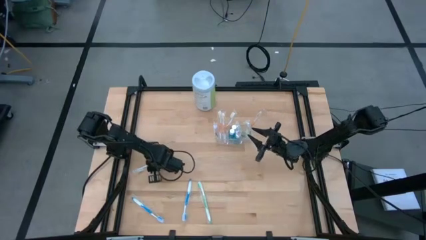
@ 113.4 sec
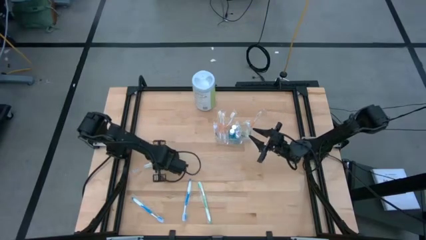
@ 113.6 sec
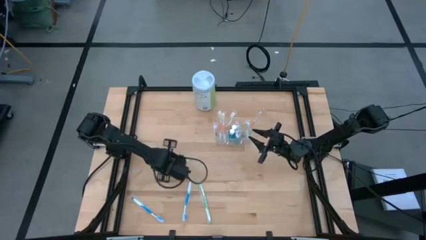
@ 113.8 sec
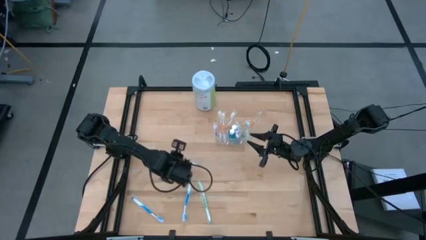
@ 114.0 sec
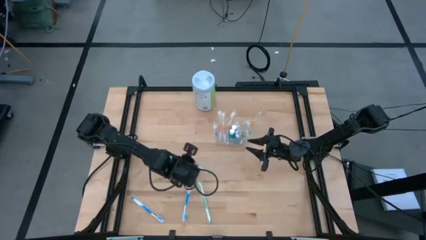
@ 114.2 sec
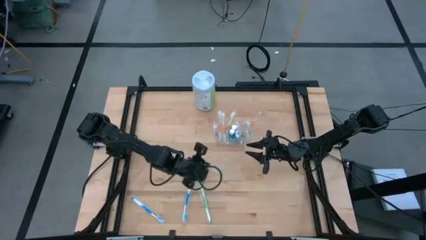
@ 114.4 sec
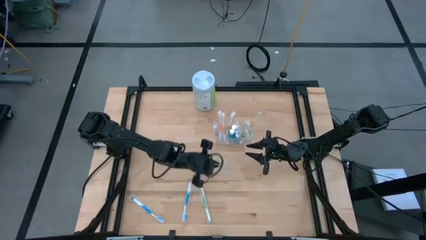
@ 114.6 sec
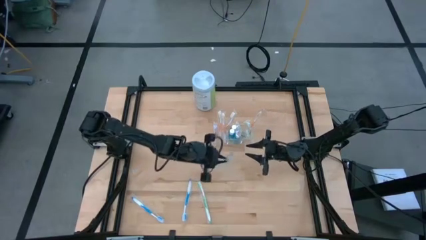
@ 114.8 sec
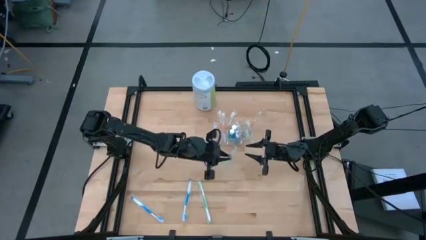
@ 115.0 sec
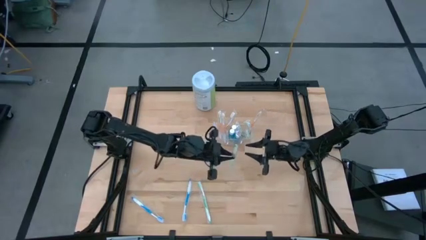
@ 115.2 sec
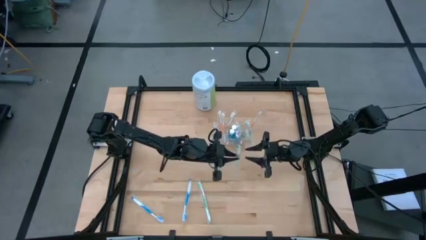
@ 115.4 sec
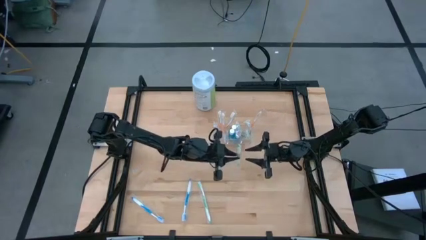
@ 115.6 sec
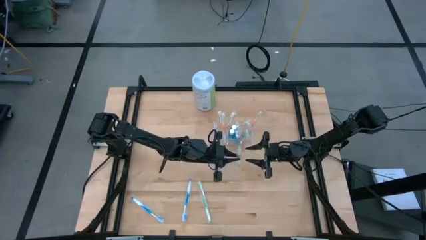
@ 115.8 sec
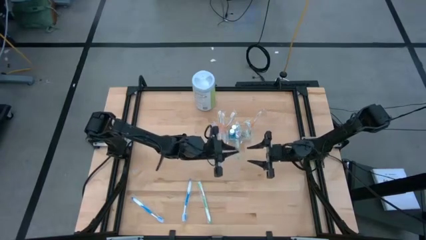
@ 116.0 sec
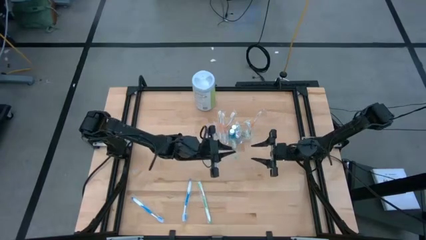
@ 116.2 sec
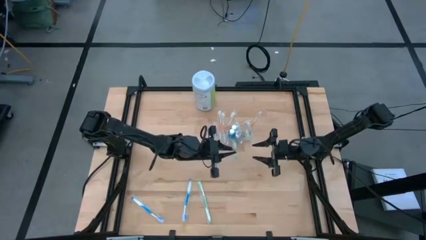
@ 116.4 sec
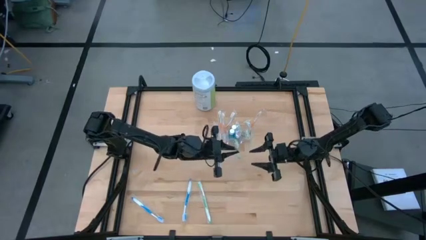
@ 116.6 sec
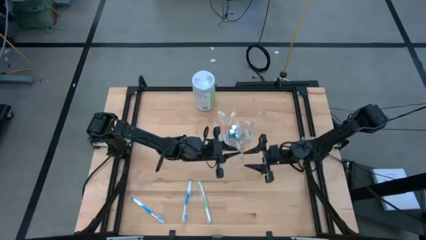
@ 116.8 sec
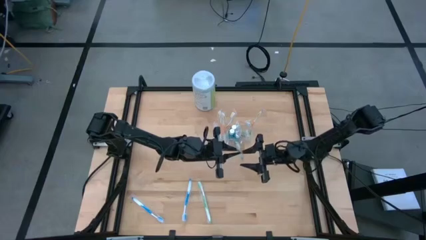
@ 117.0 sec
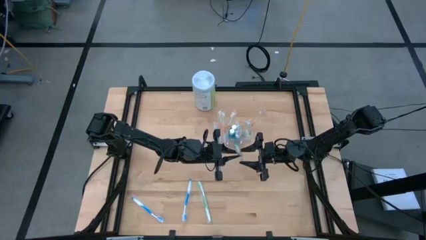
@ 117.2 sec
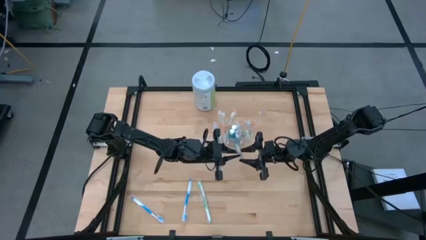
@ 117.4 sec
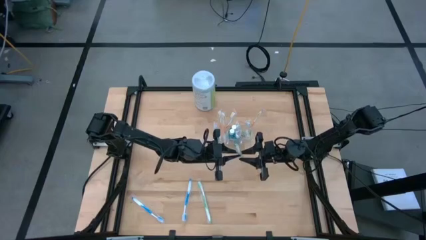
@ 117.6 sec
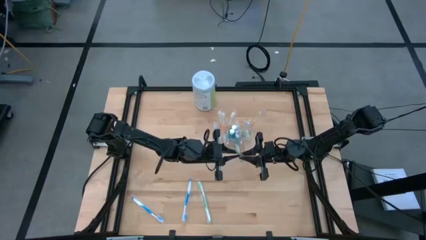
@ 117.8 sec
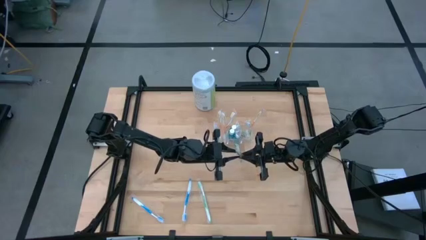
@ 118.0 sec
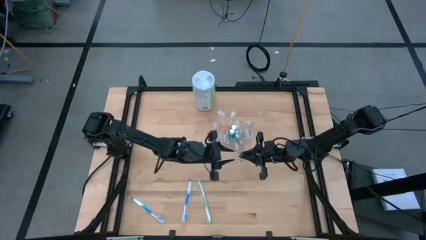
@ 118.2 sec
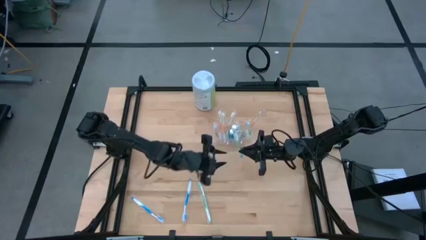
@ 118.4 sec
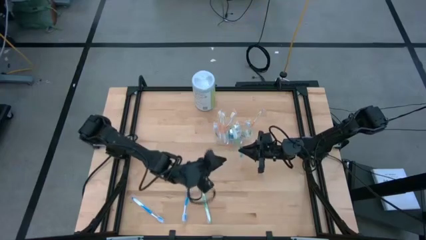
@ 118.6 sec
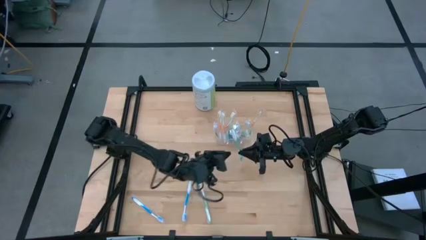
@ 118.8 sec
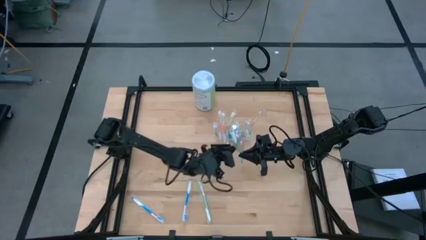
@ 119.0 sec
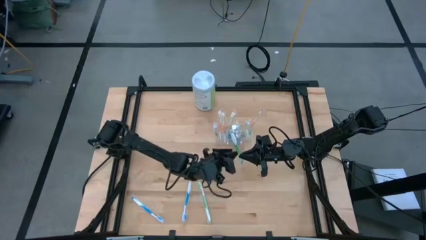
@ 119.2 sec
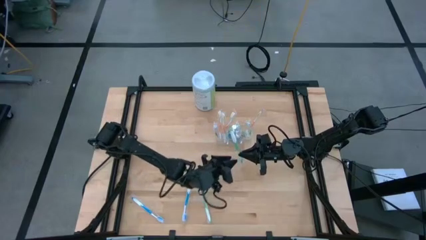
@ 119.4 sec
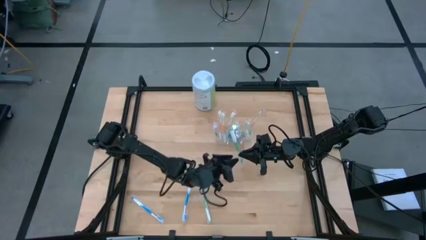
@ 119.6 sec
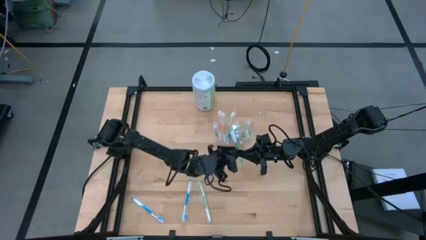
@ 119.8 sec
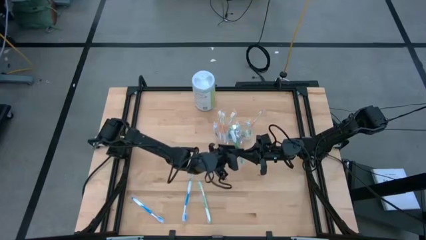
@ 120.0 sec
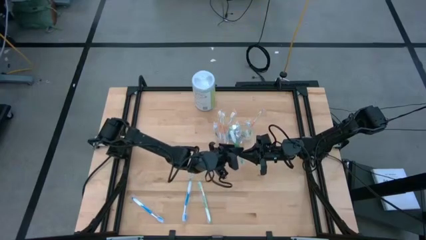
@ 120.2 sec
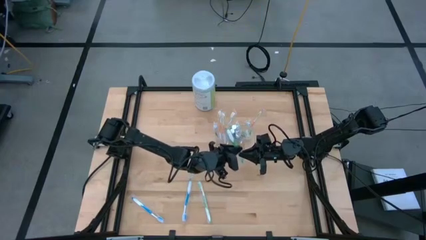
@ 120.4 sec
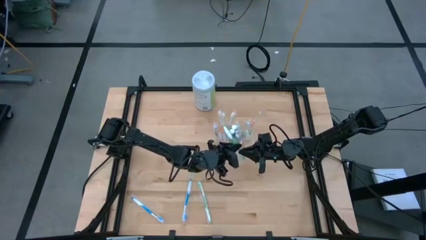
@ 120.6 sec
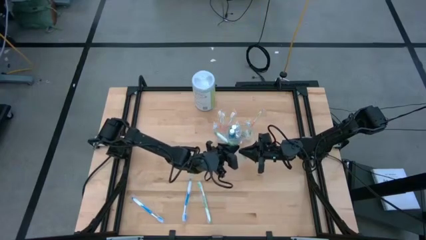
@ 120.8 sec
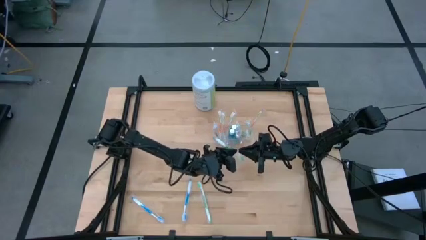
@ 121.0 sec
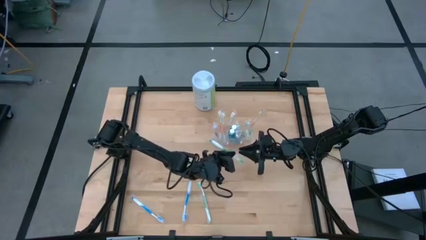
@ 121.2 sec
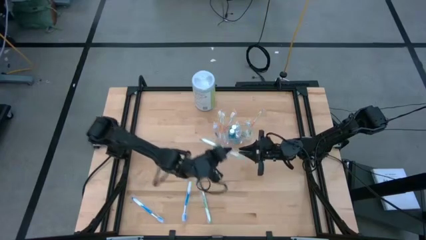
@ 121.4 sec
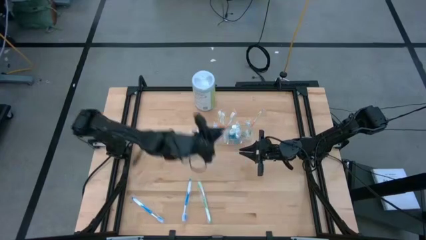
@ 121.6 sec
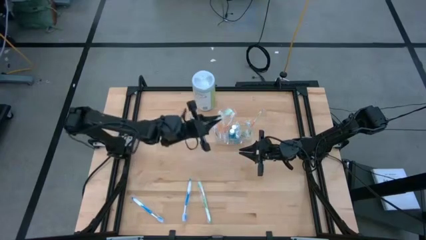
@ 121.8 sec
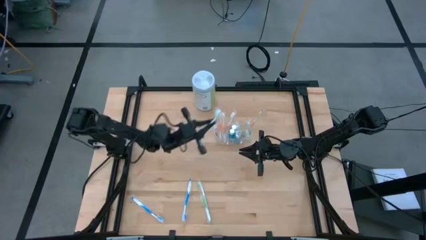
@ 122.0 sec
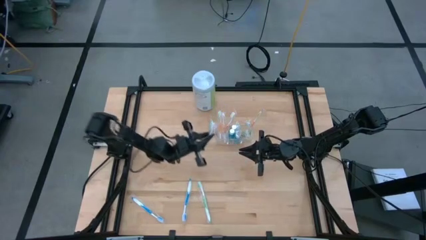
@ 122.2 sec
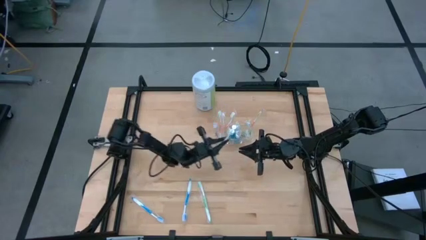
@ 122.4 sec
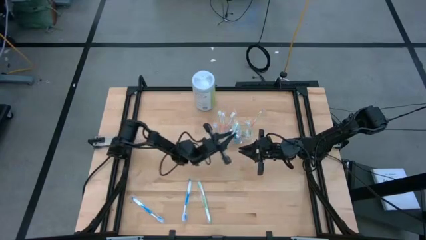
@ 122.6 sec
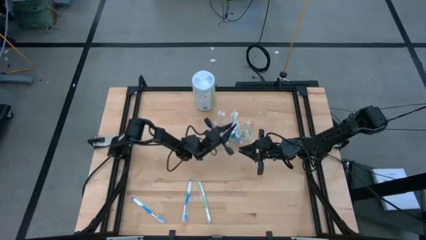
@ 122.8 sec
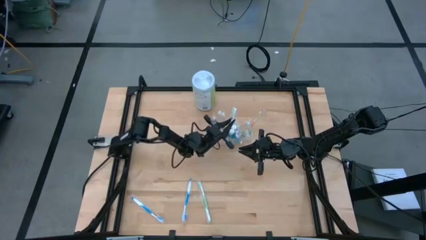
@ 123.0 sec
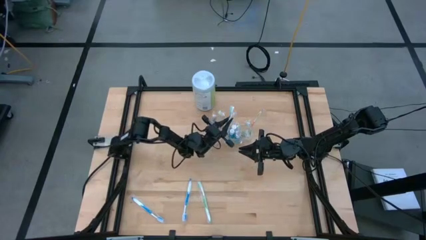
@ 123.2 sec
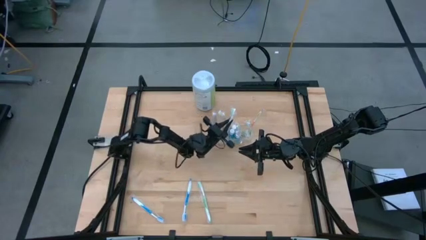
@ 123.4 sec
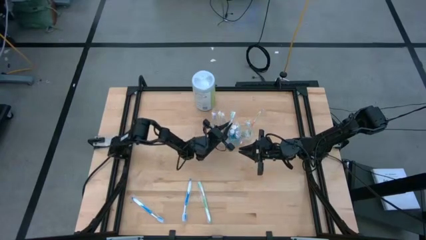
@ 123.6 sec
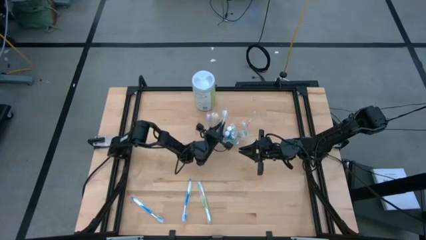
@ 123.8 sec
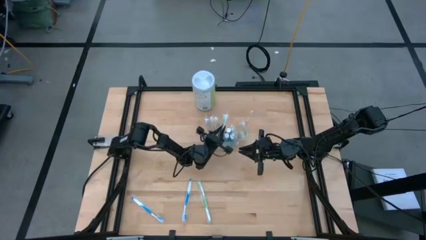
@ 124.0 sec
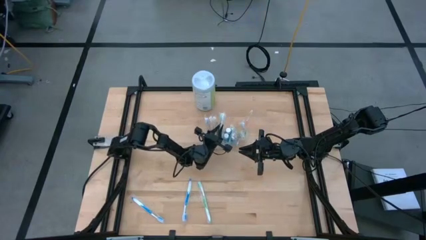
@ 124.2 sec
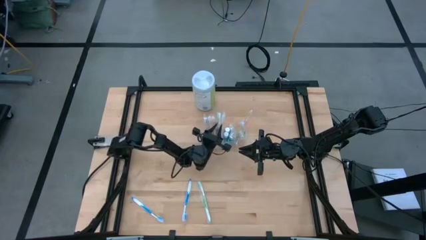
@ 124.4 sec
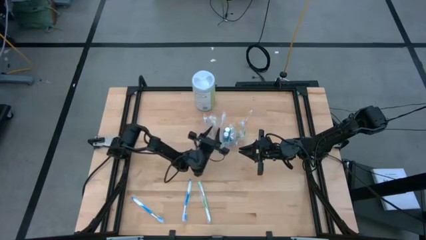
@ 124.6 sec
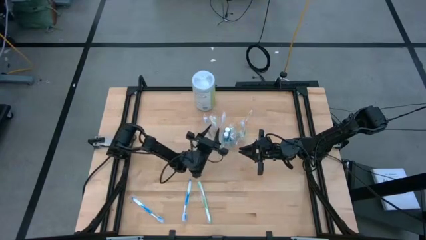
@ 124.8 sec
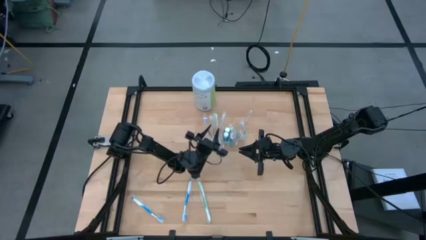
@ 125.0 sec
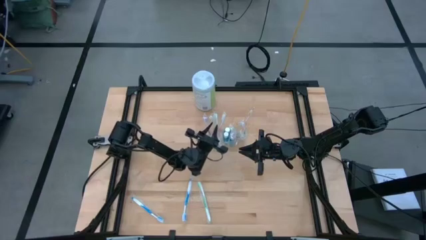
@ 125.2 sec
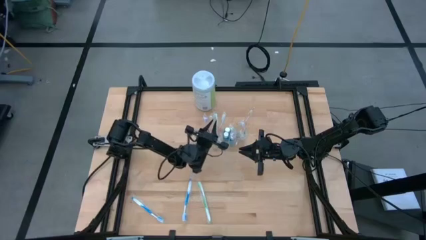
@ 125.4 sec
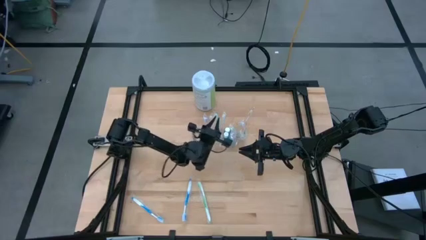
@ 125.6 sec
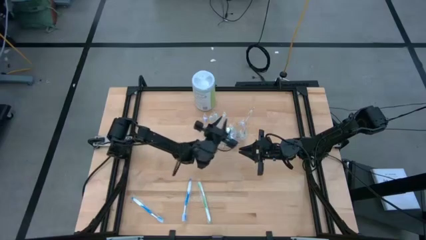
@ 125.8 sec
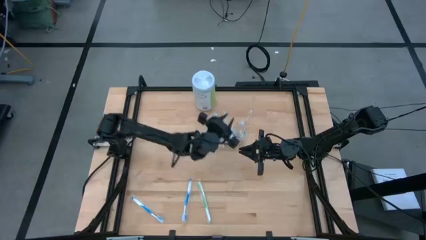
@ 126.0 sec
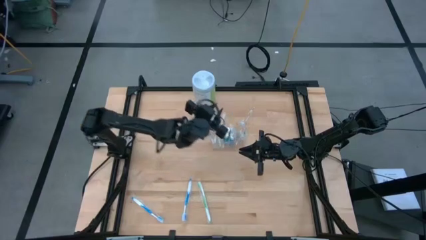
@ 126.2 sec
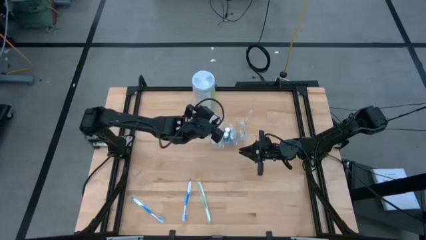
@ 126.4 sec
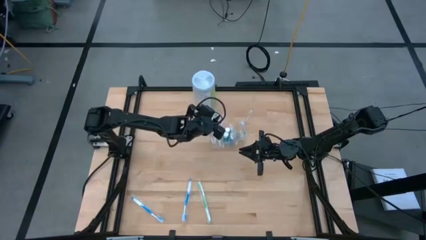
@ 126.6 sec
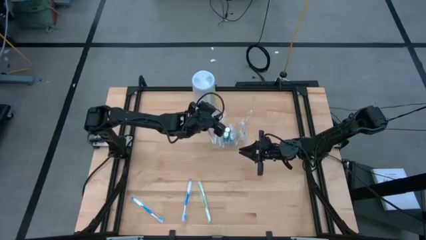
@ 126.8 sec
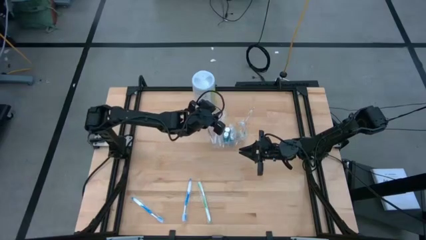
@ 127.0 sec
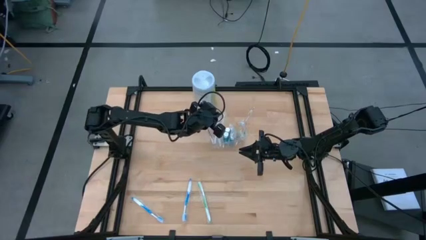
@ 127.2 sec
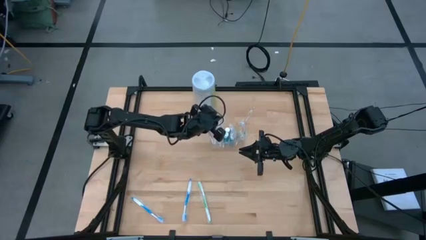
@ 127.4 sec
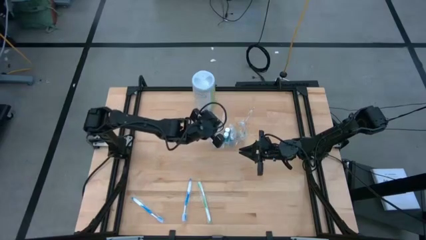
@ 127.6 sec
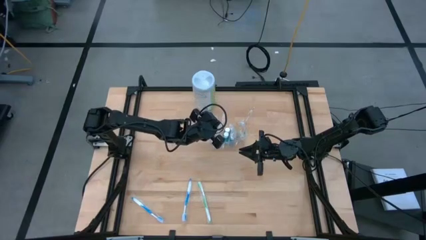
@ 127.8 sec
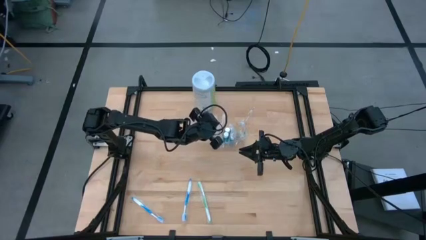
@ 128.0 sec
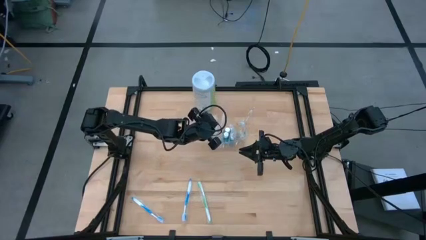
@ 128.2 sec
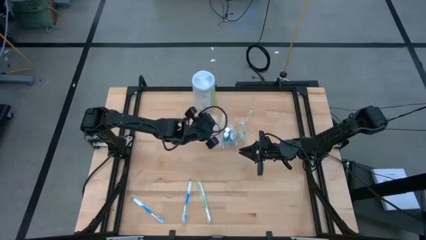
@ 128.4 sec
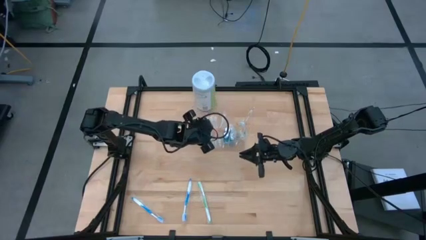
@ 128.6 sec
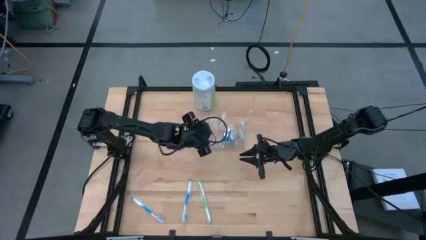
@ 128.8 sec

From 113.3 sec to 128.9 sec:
Task: Pick & Place toothbrushing station
Put the green toothbrush into the transparent organizer
